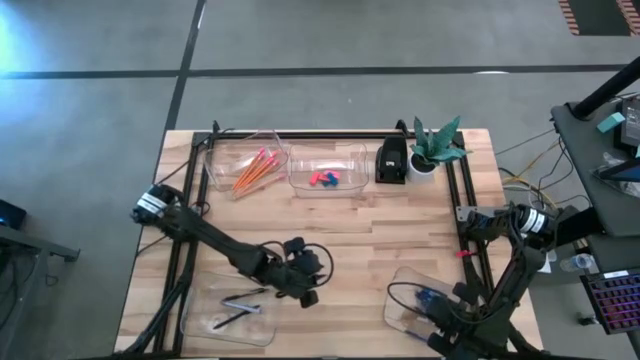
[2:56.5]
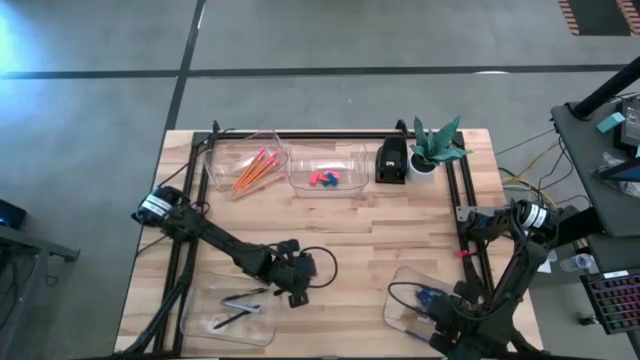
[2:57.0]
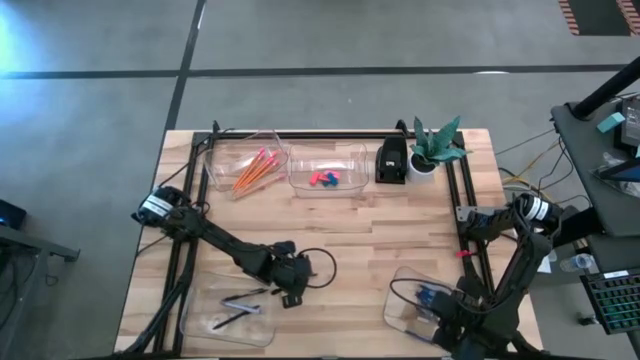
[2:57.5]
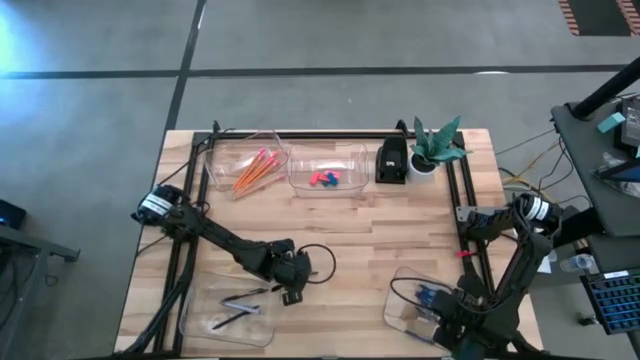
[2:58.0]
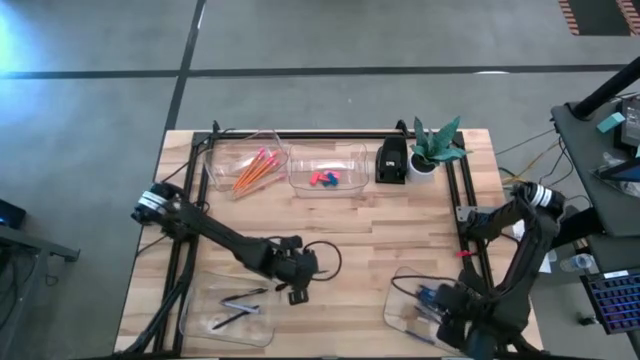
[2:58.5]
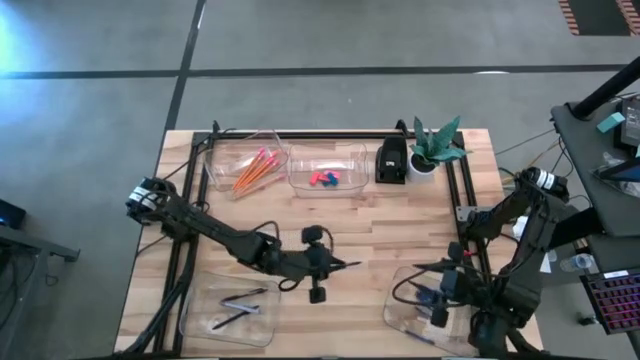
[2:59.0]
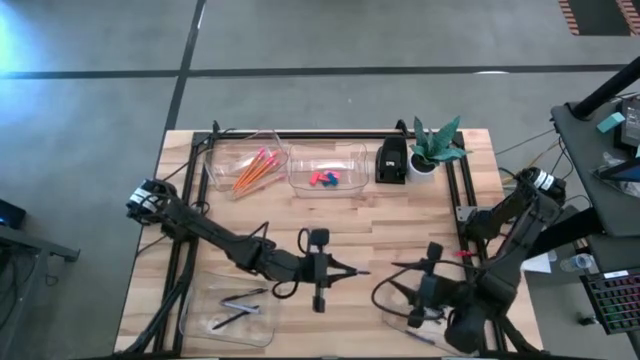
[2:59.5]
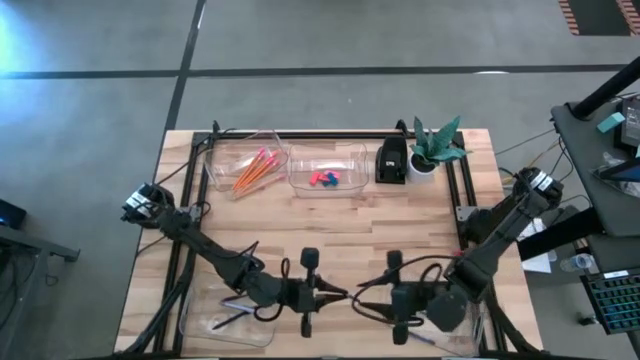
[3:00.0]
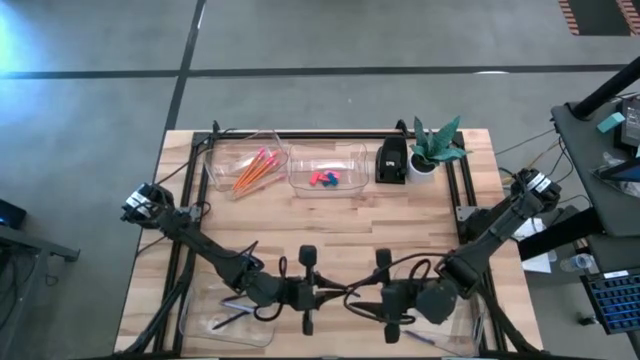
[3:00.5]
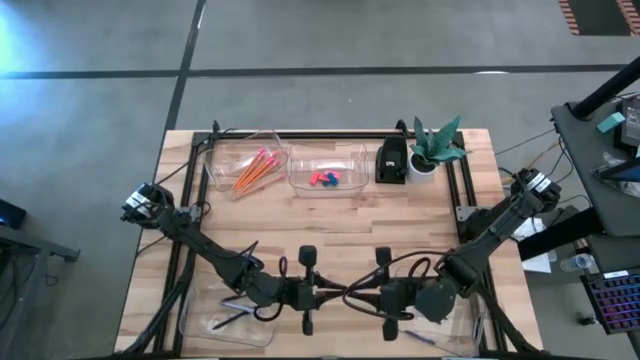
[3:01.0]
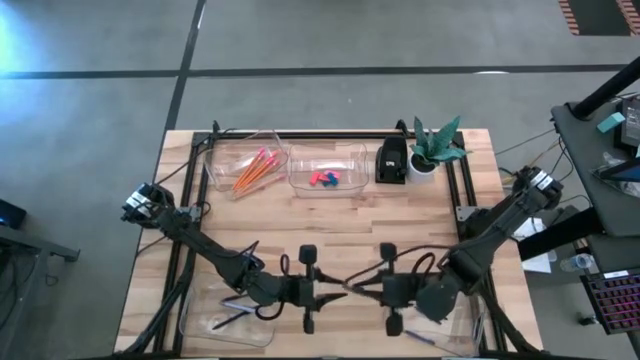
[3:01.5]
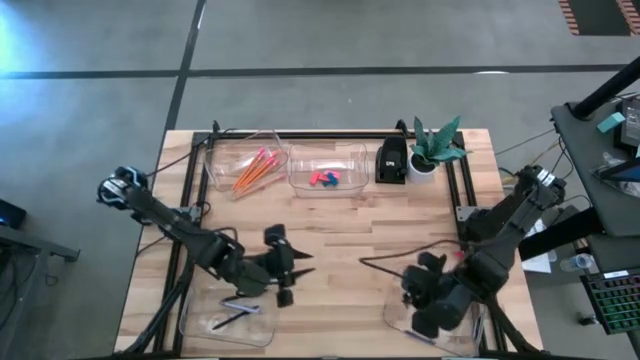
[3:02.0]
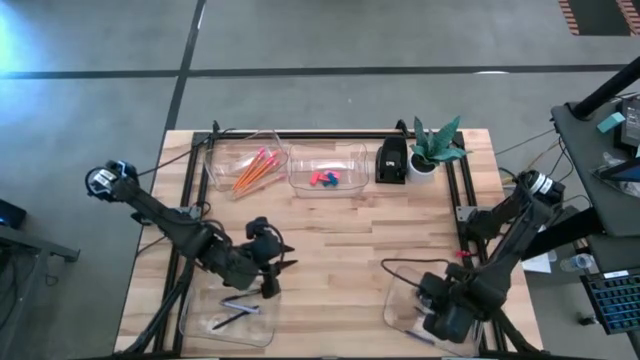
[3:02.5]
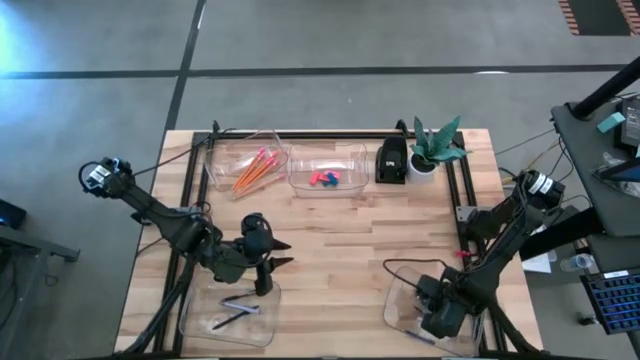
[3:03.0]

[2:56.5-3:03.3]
Task: Sort crayons/erasers/pens/pencils in bins
Put the dark blue crayon into the bottom right transparent bin

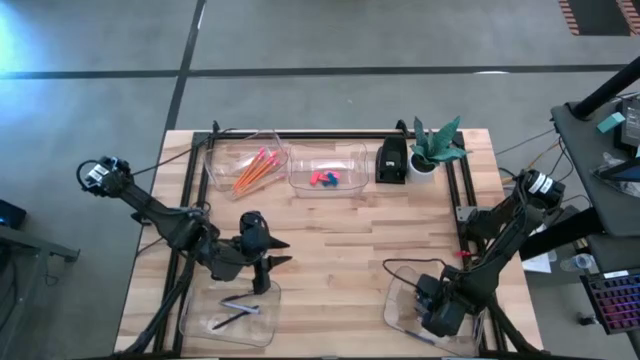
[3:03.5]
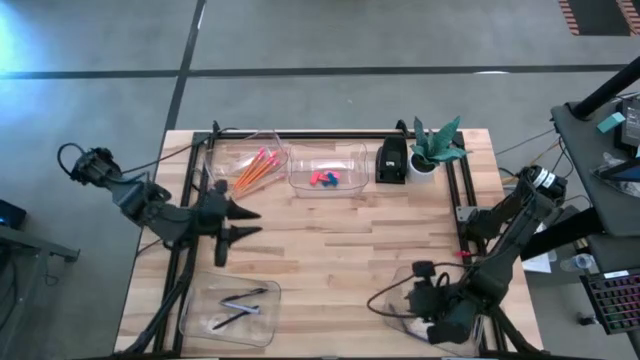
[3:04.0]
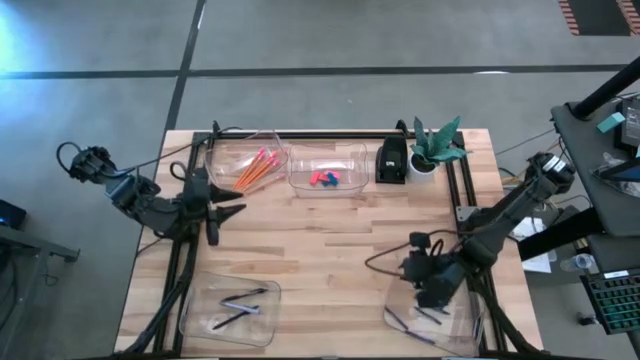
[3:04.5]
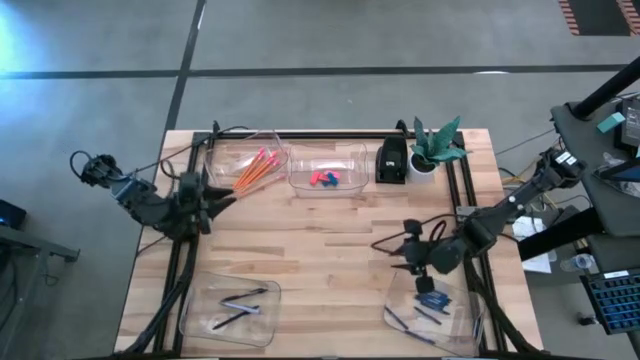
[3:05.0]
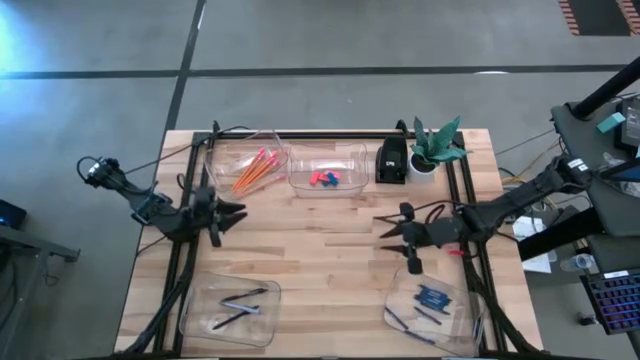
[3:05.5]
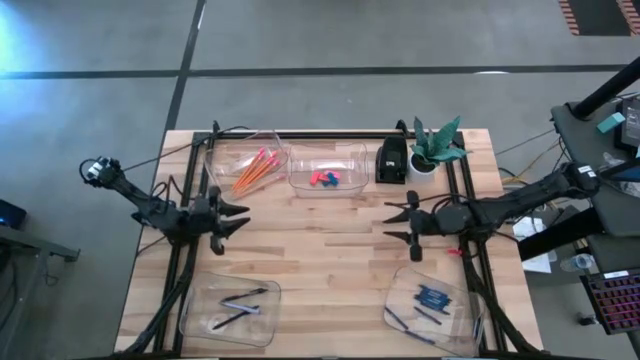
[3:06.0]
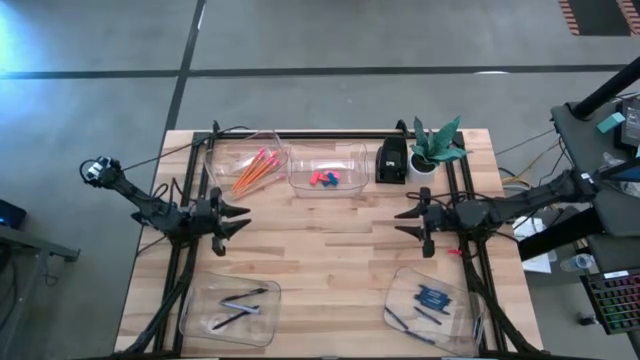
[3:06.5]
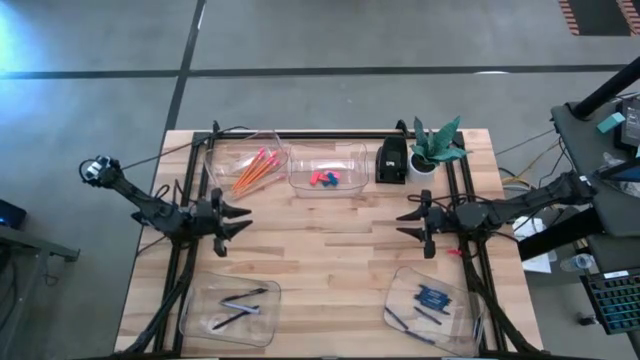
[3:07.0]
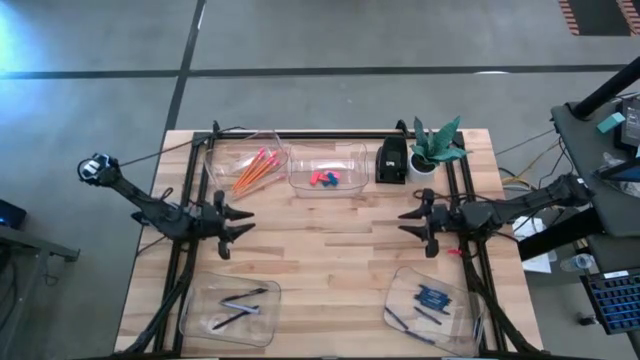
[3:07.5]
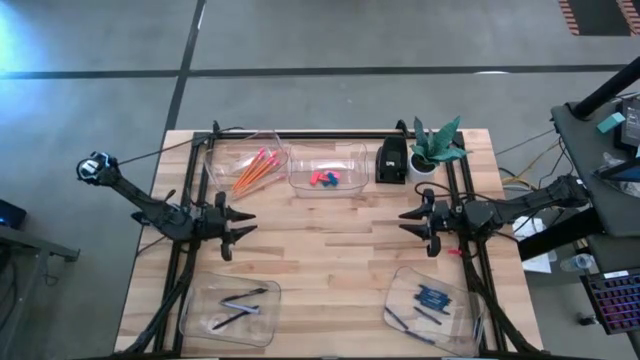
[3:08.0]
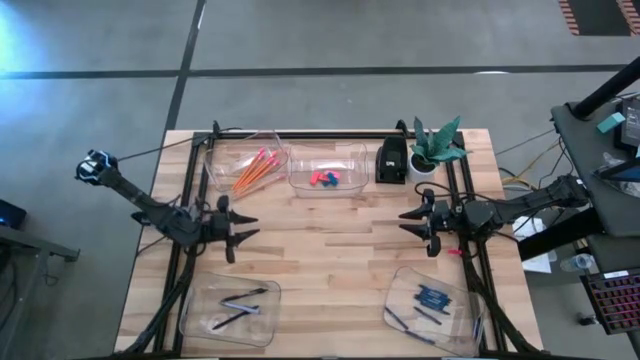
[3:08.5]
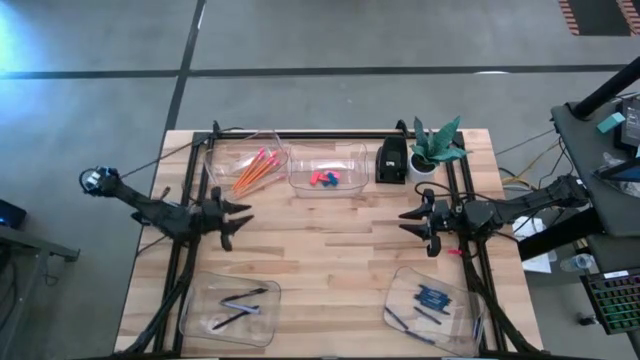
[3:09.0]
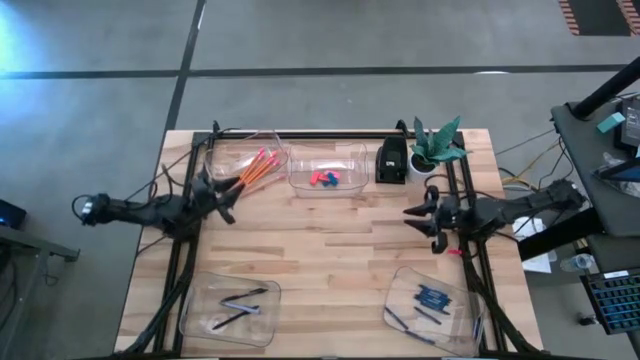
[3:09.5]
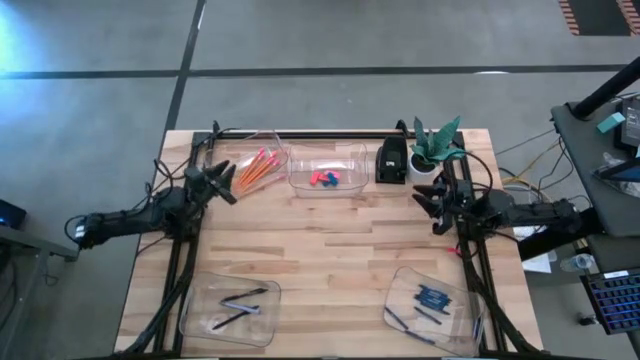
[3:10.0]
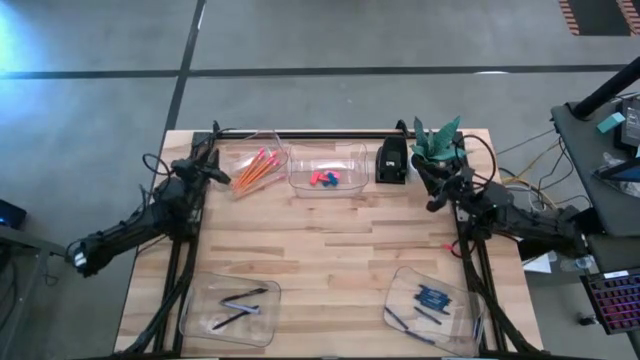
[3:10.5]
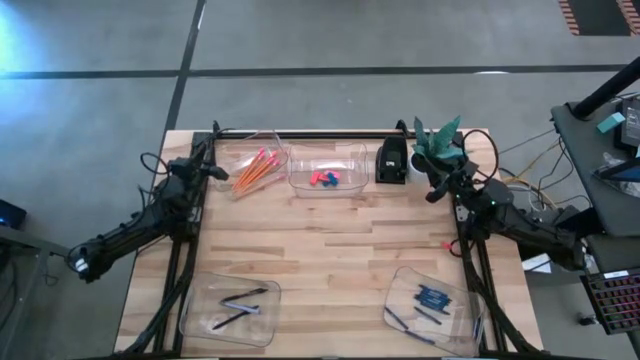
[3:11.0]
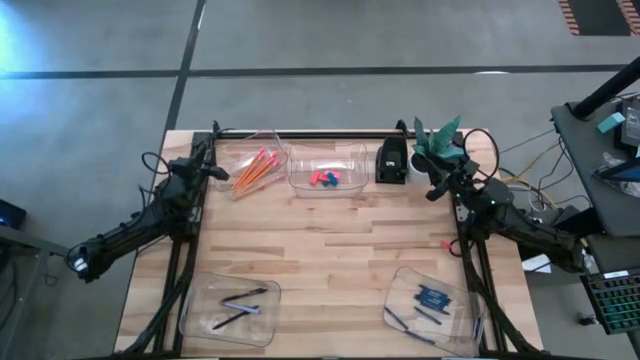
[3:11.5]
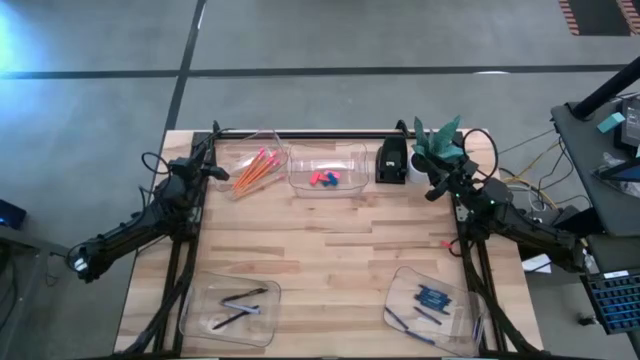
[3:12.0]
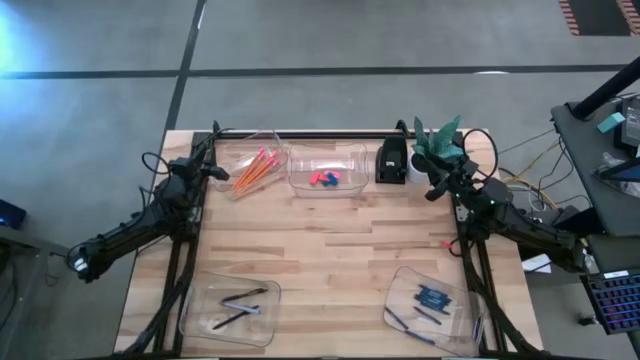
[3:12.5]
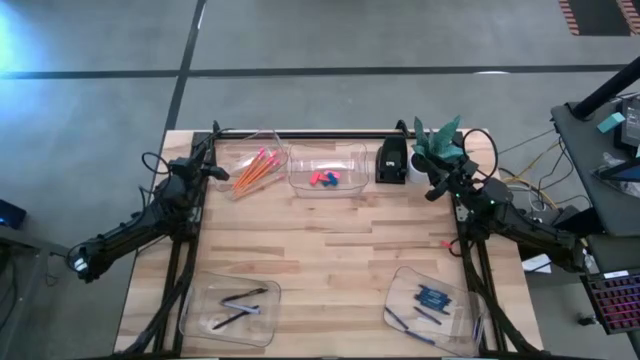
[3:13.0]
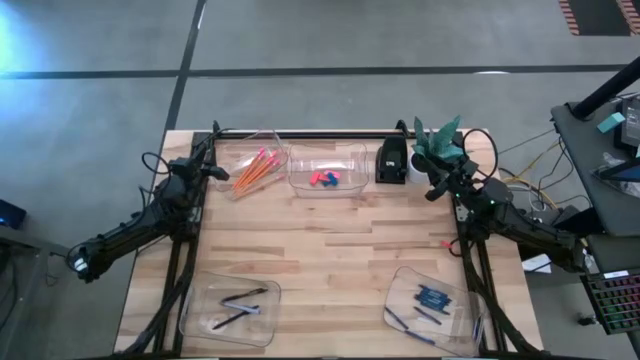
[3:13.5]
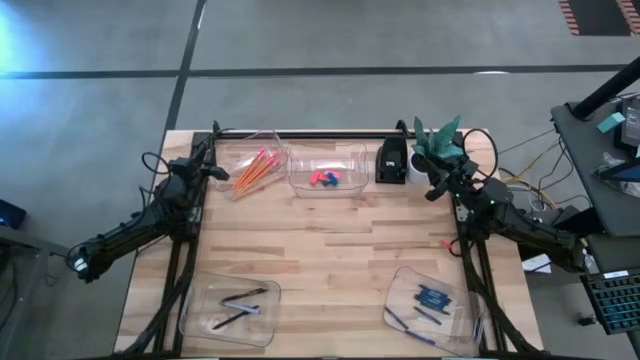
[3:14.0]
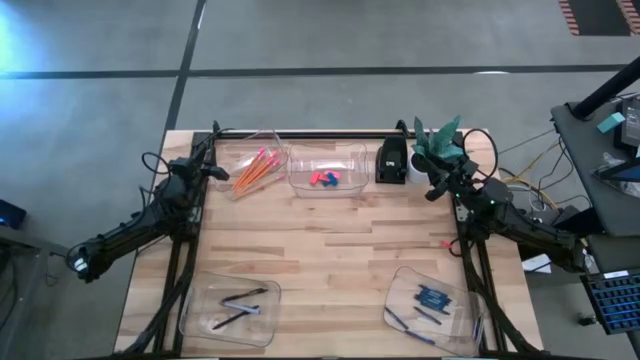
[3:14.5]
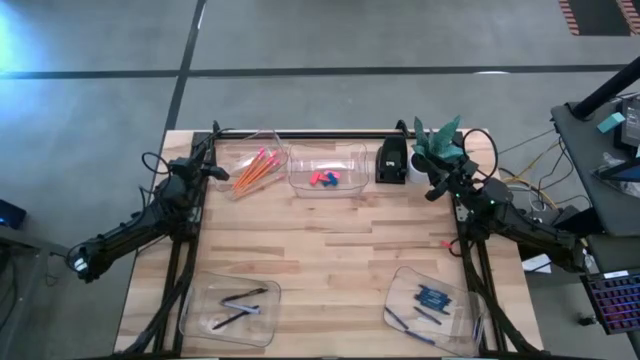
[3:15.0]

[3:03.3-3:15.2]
Return to home position
